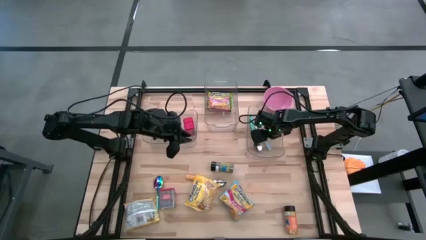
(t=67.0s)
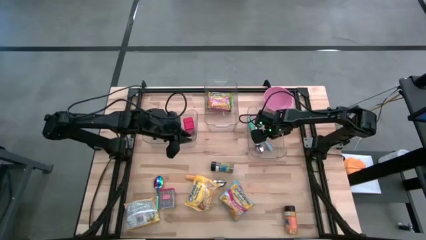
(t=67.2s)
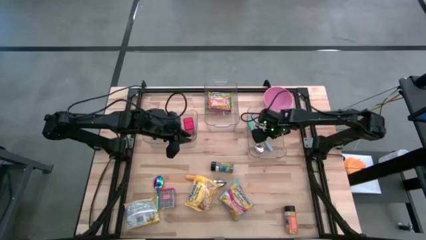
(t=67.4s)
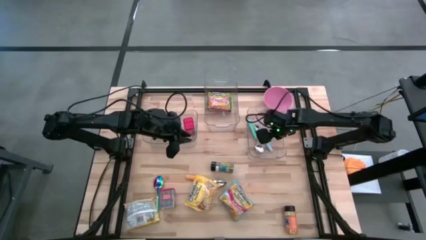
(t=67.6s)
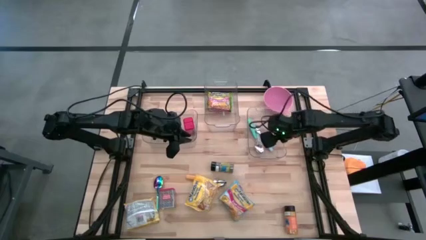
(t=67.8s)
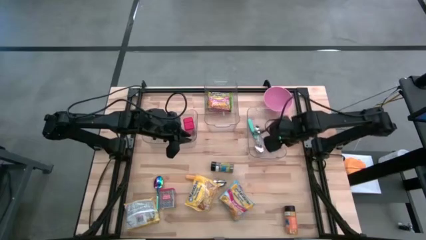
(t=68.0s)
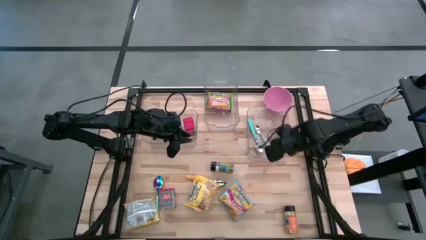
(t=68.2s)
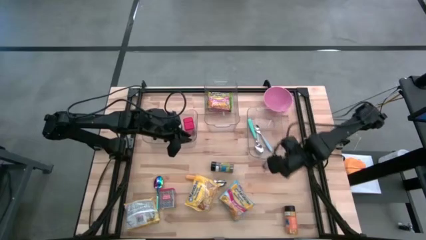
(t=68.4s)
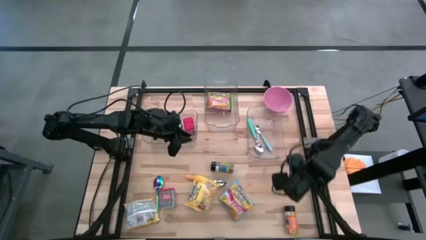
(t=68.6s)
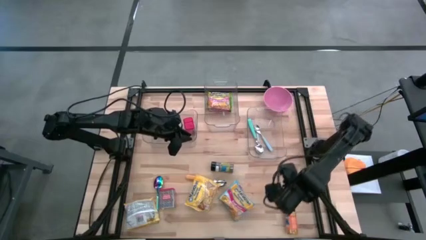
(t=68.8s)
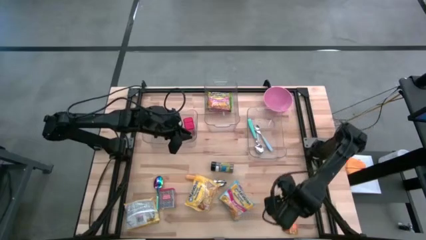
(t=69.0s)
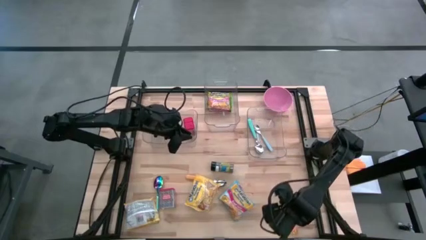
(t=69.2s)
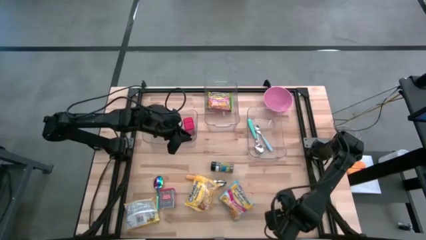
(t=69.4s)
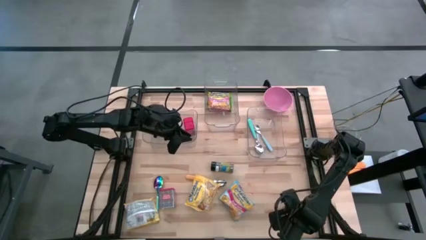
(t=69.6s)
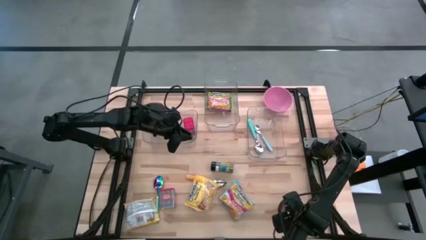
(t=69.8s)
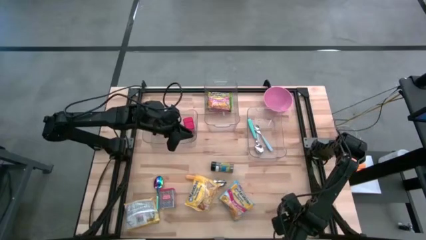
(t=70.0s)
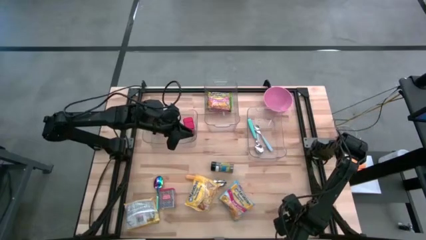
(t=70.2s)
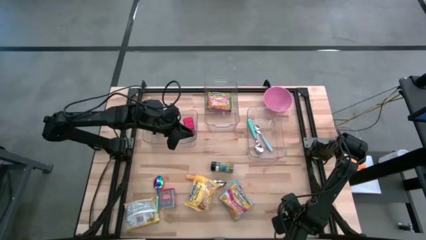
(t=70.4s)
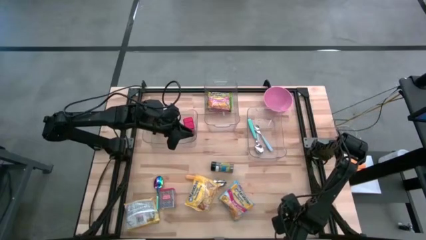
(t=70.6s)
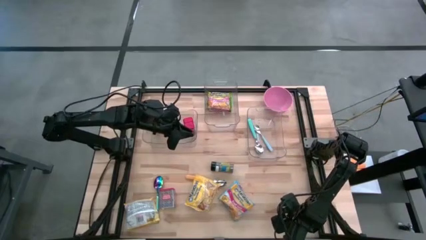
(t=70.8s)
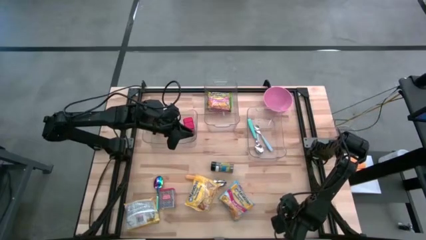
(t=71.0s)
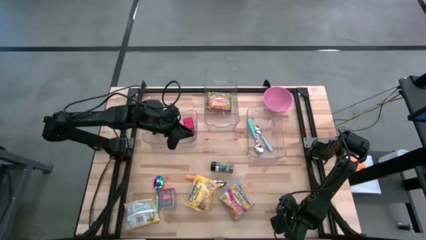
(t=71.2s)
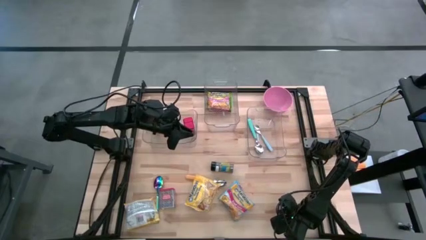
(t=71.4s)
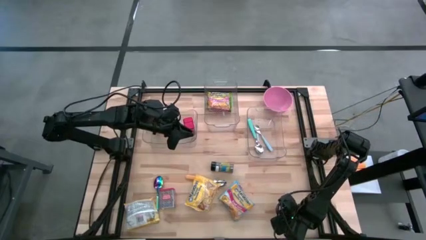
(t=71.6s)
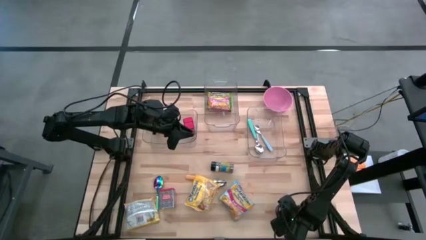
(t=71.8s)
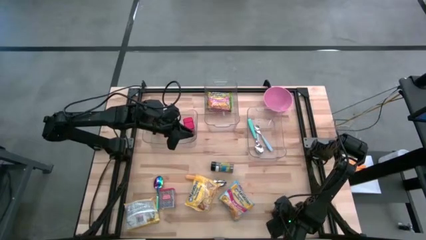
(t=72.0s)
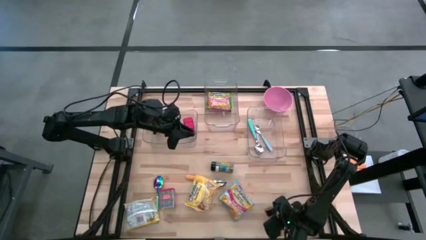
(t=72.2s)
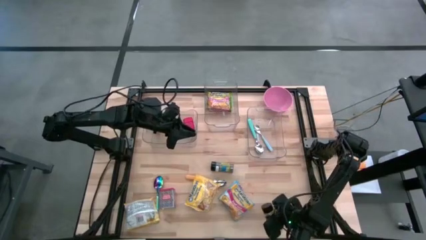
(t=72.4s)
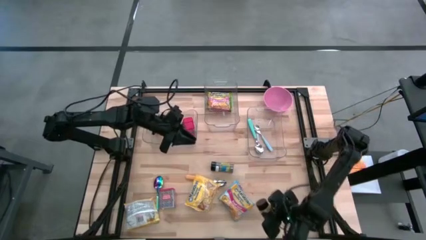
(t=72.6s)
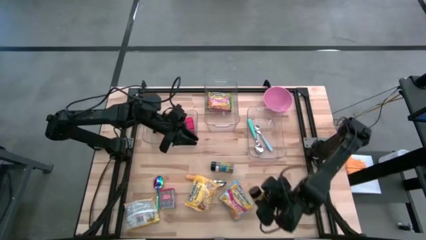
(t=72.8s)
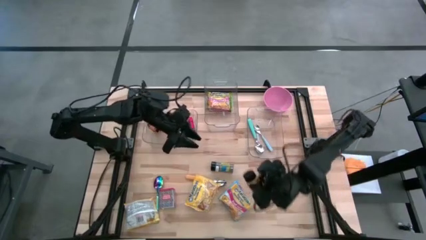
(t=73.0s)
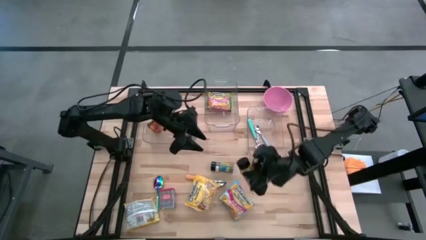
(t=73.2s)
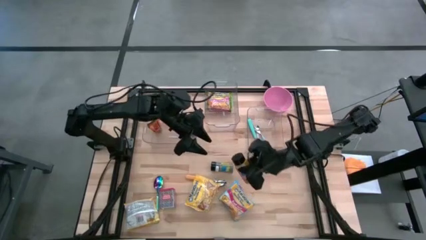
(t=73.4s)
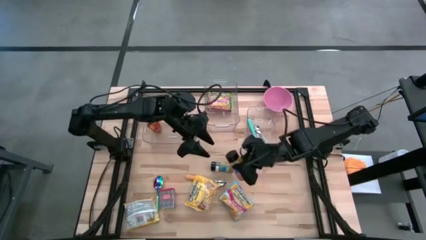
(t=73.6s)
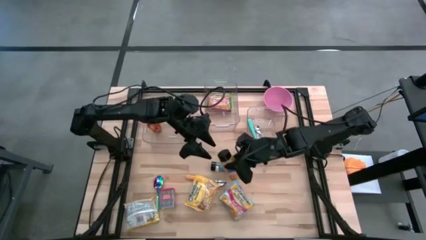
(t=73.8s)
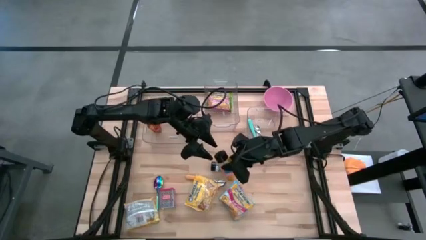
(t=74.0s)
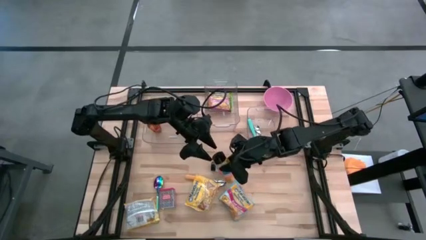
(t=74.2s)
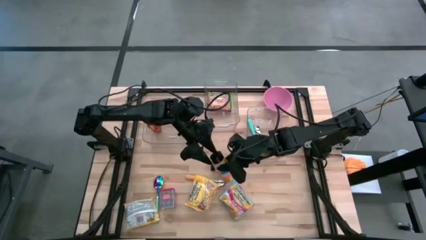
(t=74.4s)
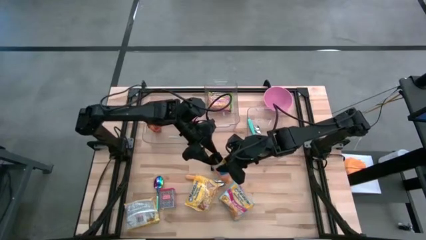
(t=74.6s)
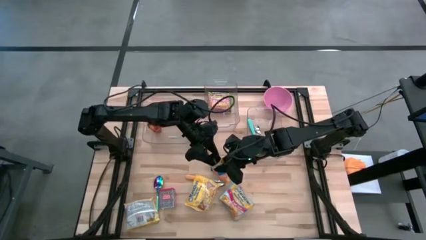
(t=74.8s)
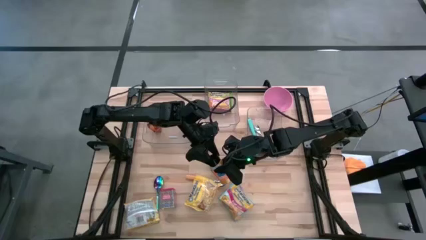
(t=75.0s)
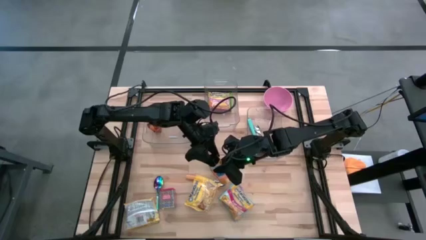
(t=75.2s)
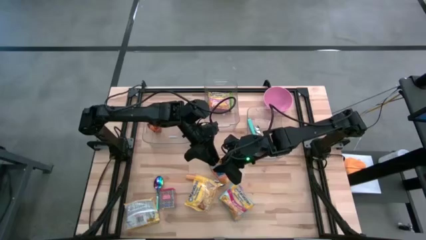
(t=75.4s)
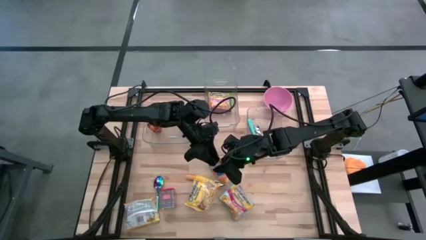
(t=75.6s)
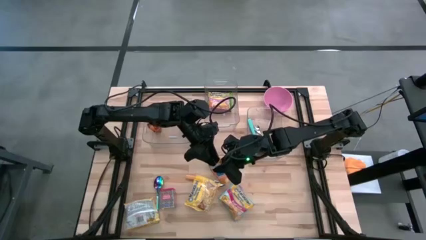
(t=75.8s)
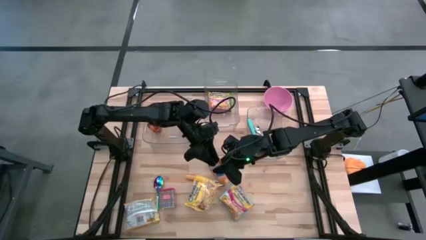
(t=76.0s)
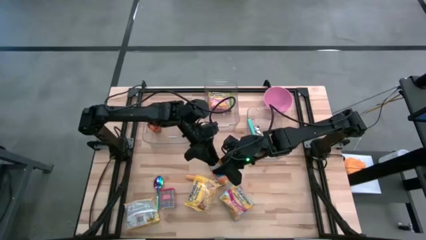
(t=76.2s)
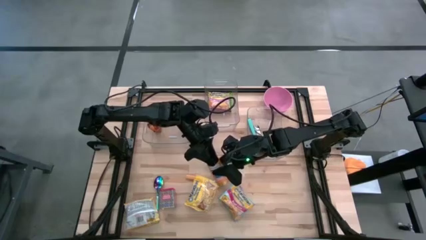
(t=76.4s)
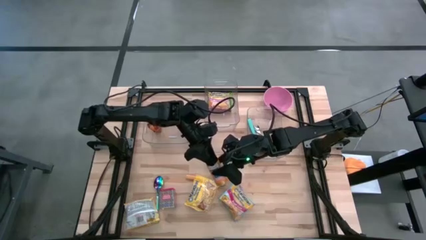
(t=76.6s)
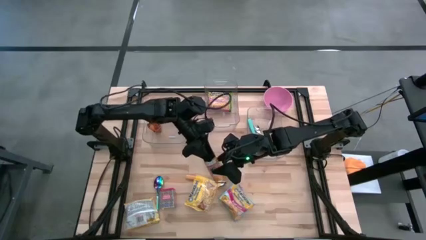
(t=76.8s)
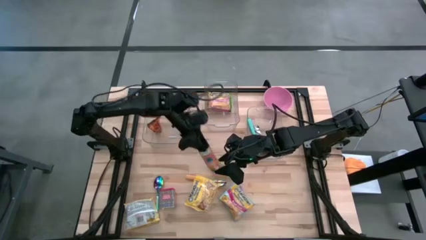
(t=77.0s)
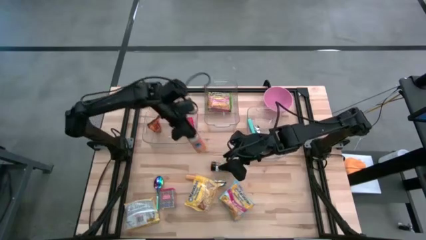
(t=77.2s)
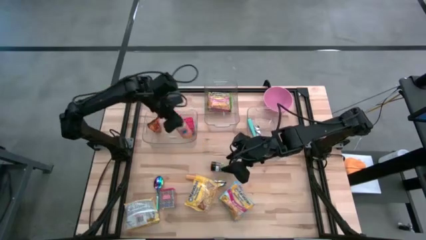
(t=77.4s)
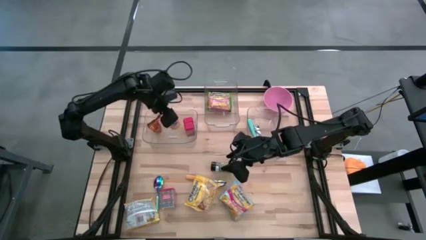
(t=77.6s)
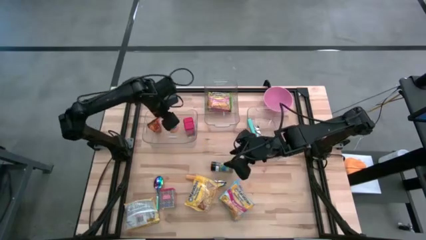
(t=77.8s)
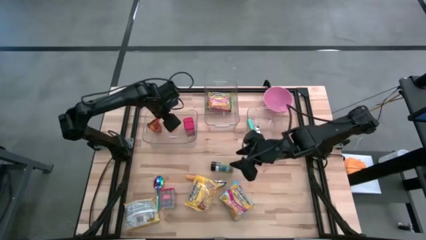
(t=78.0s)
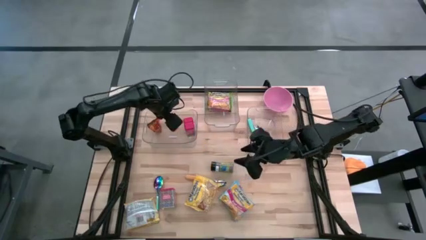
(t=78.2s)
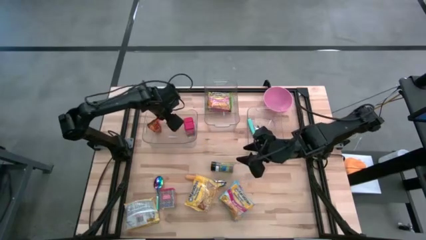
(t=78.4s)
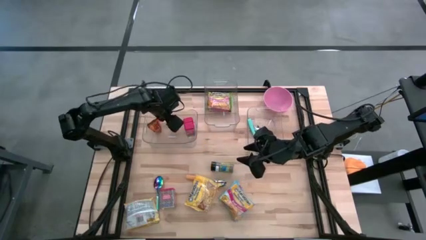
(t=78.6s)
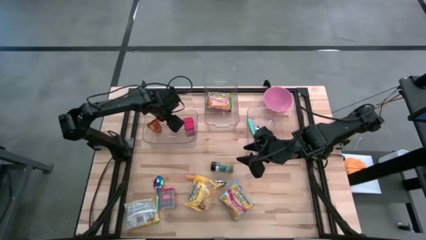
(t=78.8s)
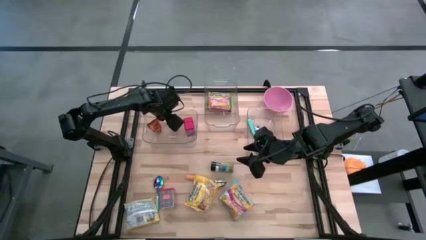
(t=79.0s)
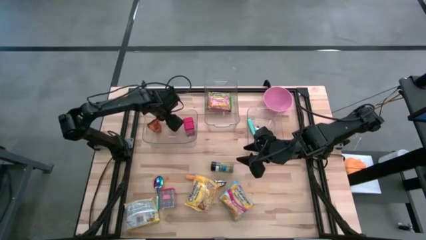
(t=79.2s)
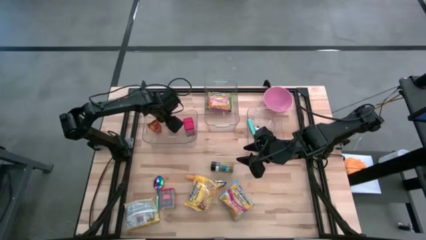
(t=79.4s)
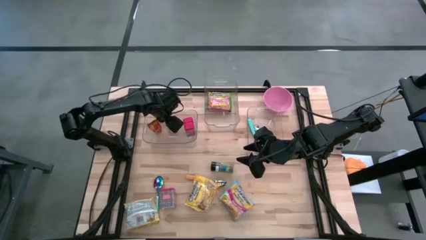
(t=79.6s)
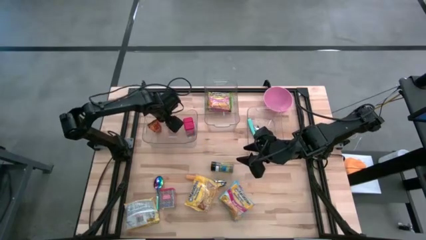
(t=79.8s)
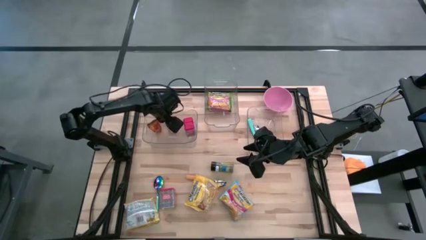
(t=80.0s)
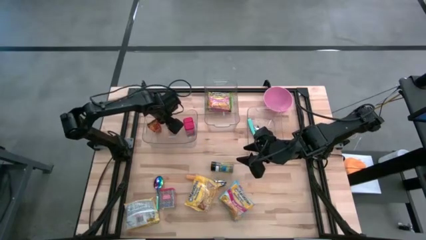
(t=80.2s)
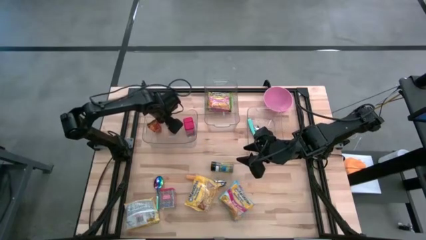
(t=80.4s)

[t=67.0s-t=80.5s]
Put the orange seasoning bottle into the left transparent bin

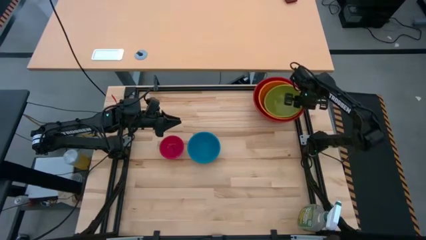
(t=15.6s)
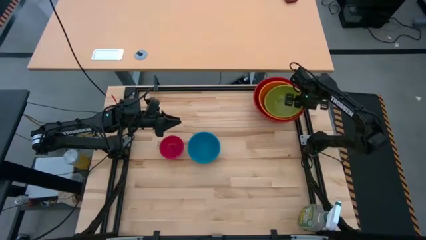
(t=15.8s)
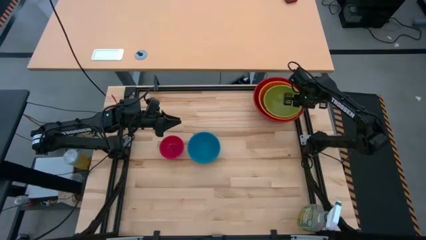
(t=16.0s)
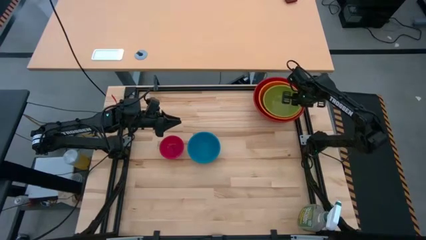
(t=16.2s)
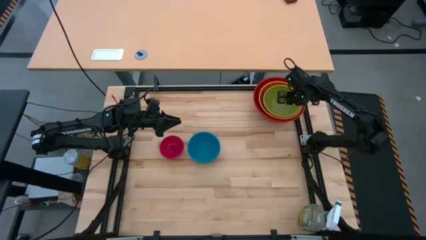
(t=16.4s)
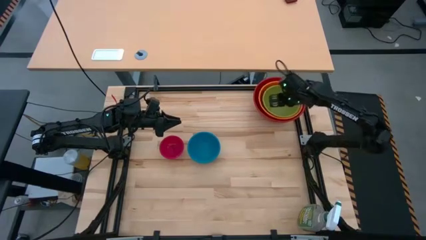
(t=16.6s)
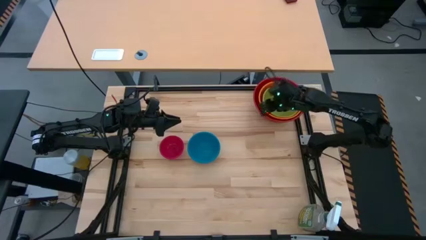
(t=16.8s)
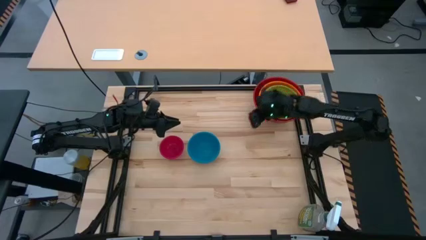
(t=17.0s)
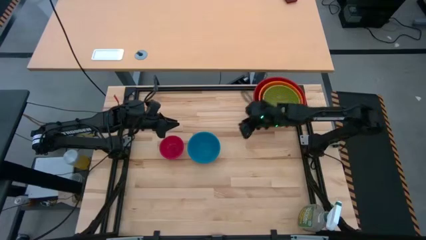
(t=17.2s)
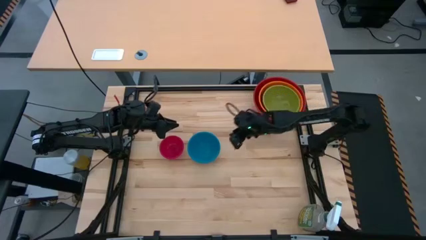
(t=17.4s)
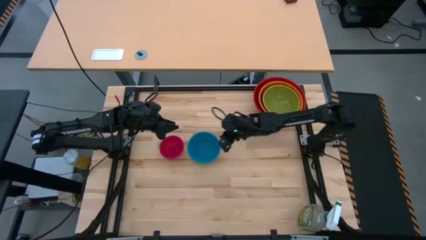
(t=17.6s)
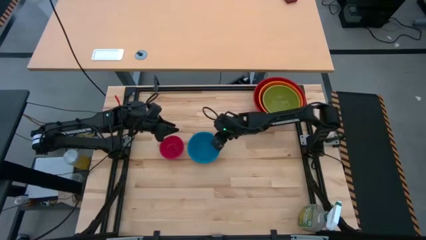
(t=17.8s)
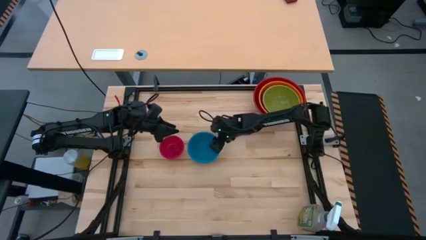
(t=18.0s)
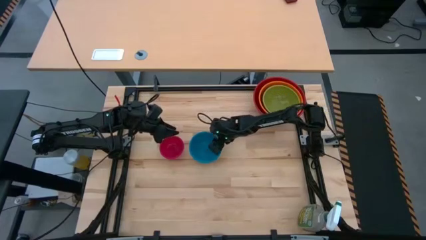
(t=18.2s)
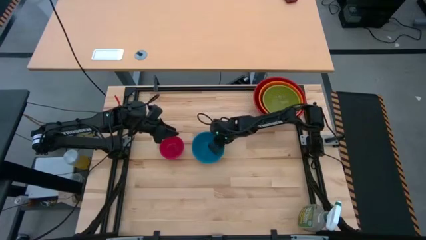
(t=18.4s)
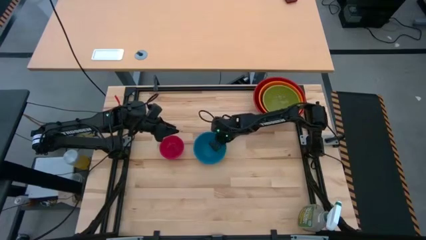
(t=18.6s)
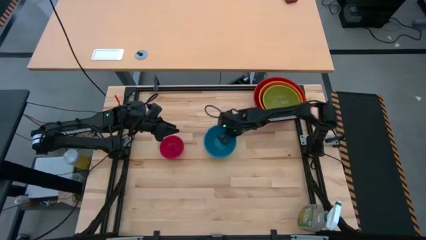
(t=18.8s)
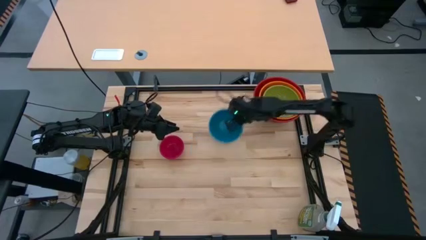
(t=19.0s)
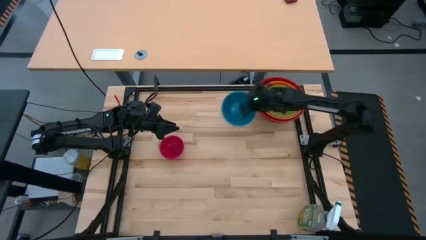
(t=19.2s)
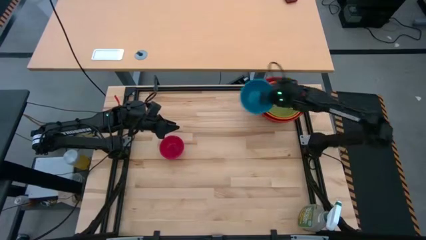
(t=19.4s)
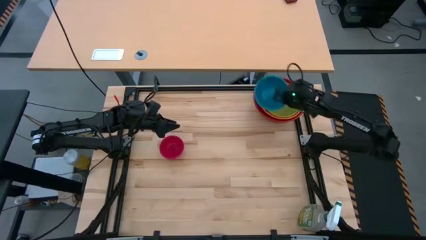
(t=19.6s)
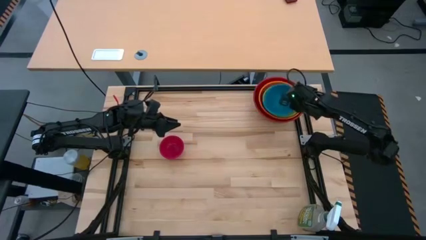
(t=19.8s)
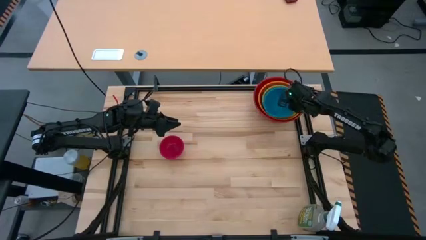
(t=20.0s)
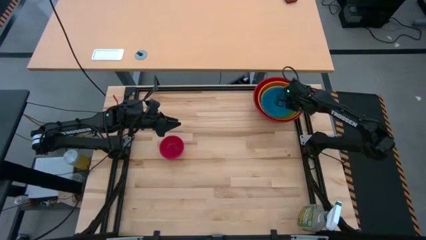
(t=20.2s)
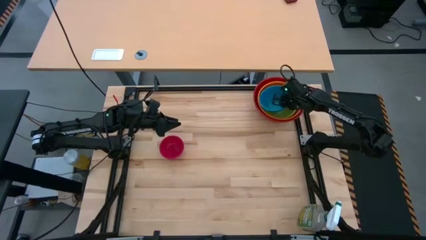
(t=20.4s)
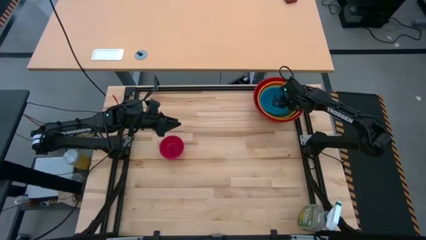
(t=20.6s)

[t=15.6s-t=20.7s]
Stack the blue bowl on top of the green bowl
